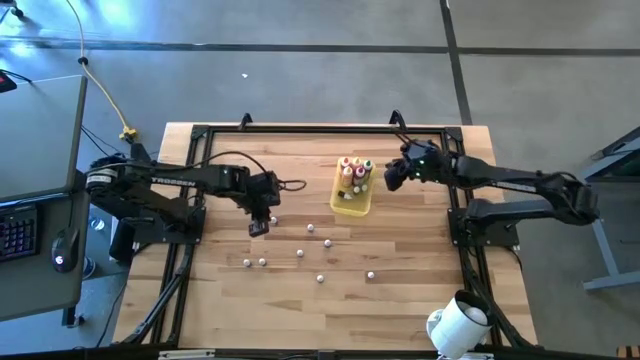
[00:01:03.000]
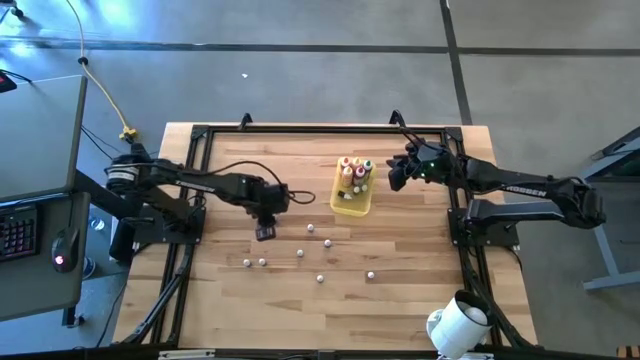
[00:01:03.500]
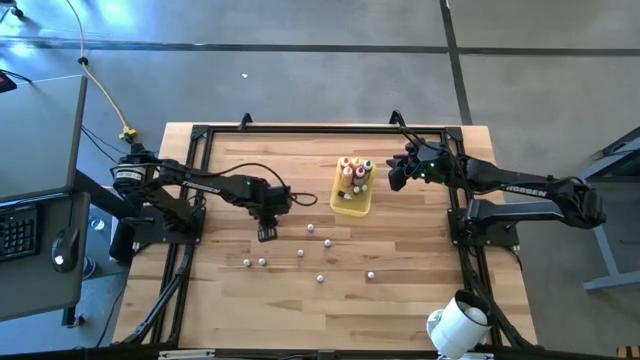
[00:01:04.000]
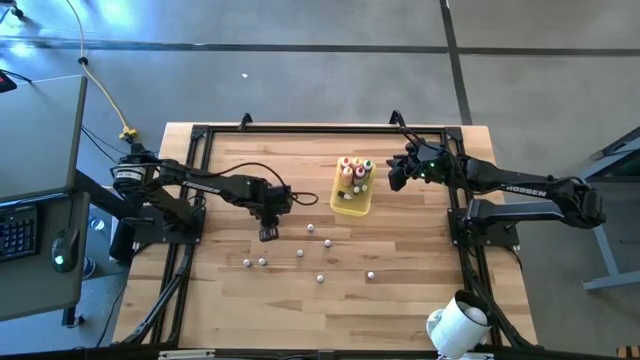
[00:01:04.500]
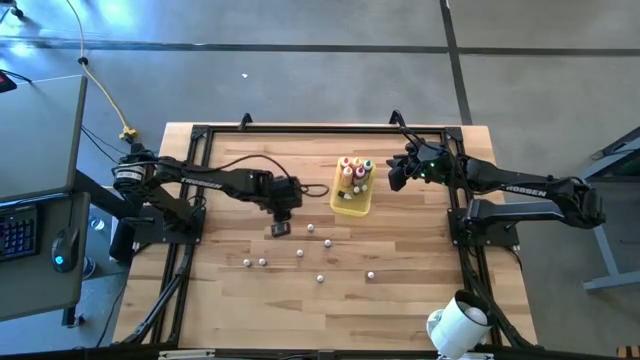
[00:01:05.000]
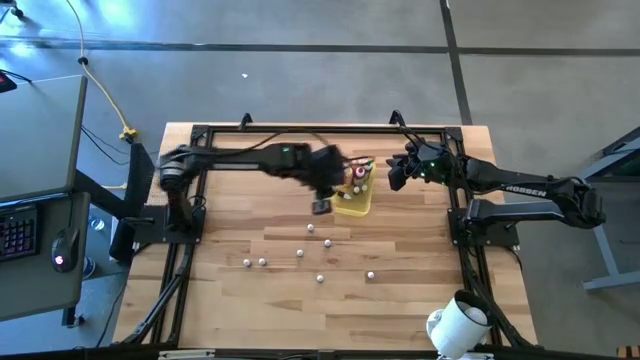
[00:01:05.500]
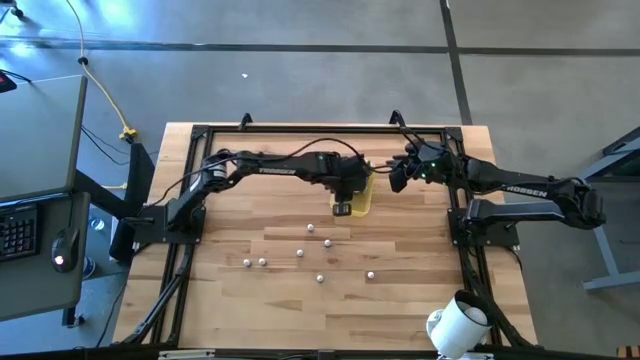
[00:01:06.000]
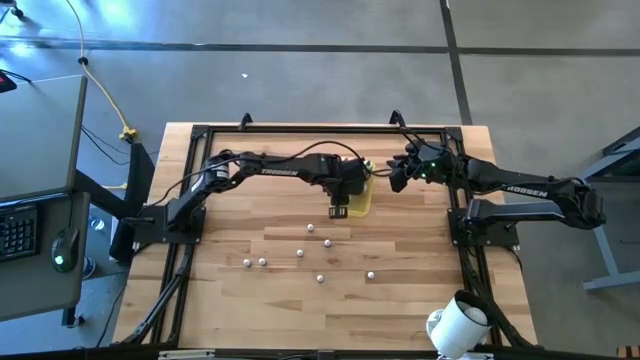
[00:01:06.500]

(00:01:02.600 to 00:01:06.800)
Task: Pick & Place food coloring
Put the small red food coloring bottle into the bin

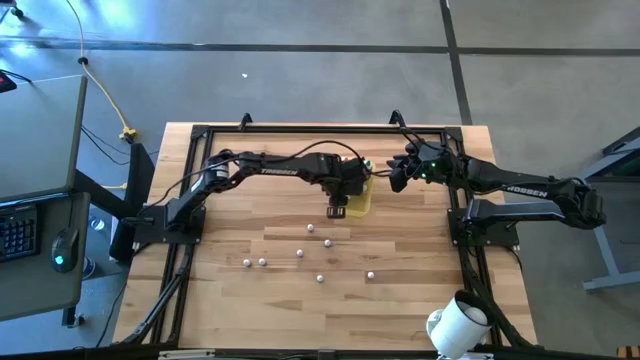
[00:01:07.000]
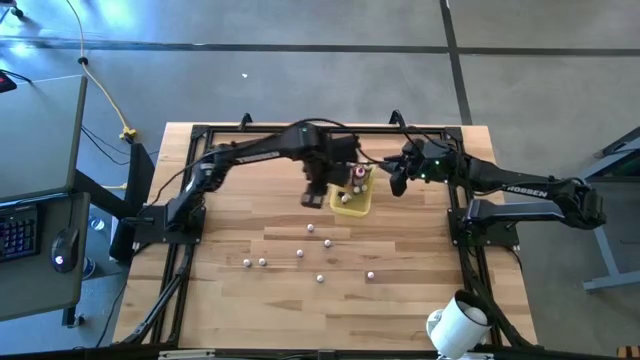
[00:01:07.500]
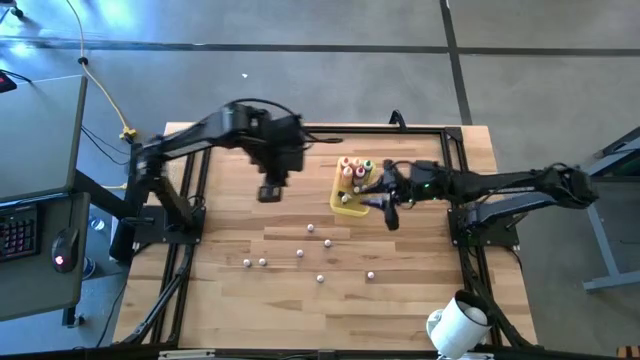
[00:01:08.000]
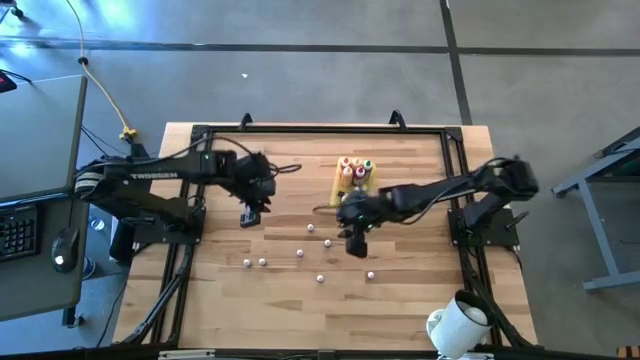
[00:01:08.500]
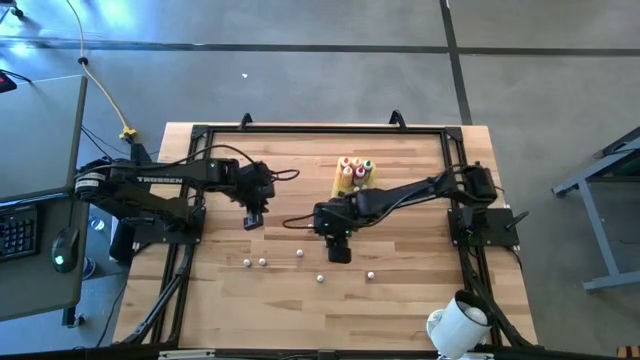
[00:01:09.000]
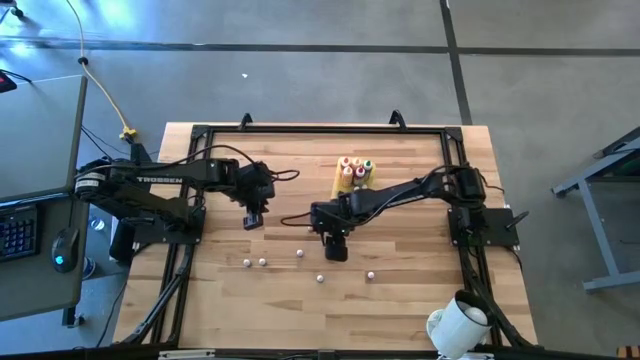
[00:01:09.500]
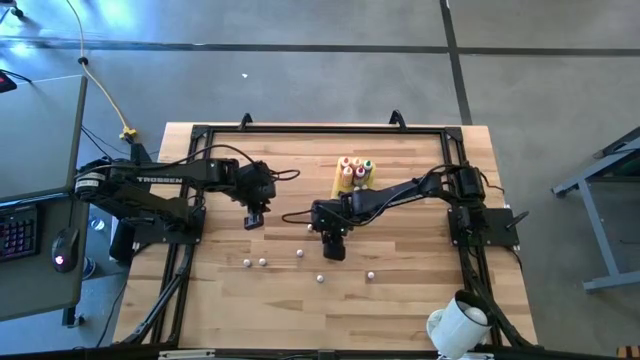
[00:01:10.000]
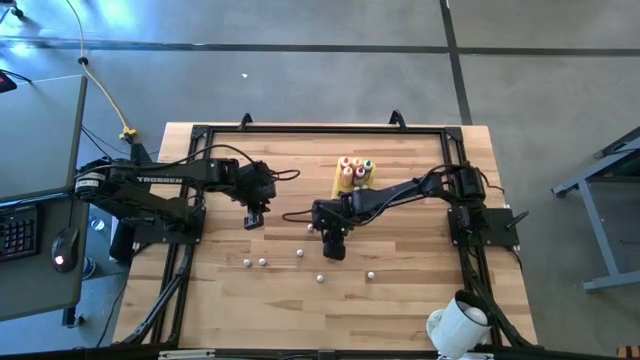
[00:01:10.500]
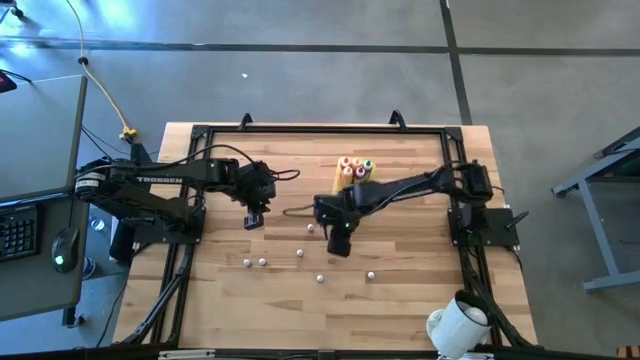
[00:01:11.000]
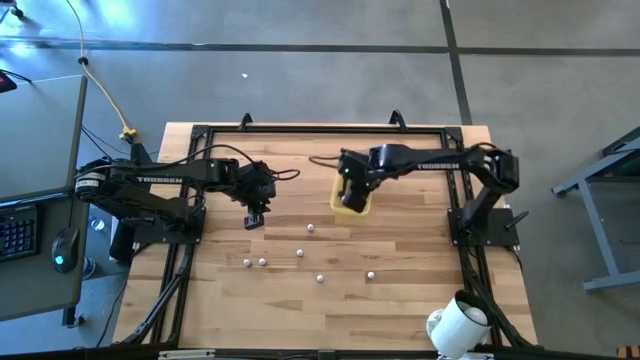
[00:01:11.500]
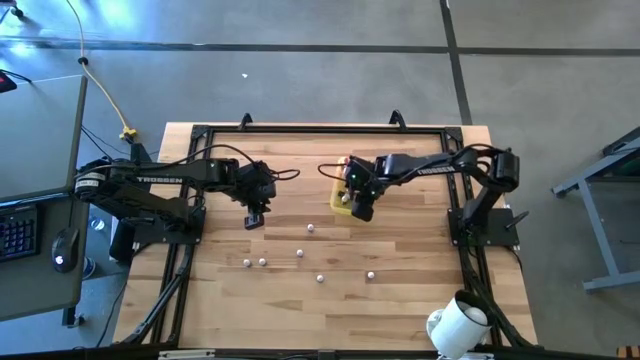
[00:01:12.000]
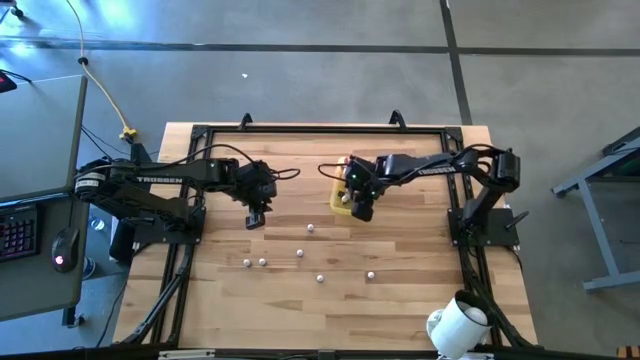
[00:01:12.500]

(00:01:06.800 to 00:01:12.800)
Put the small green food coloring bottle into the bin

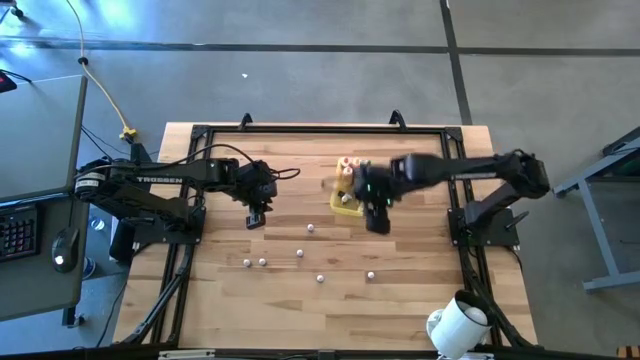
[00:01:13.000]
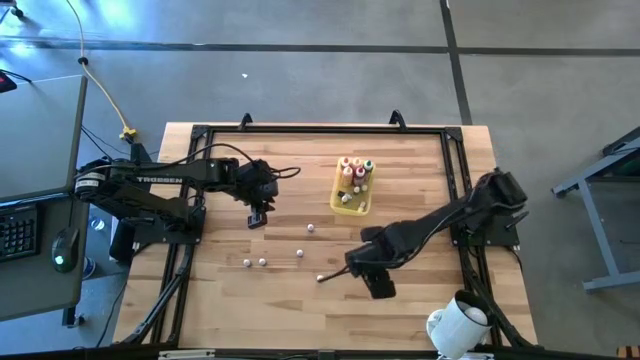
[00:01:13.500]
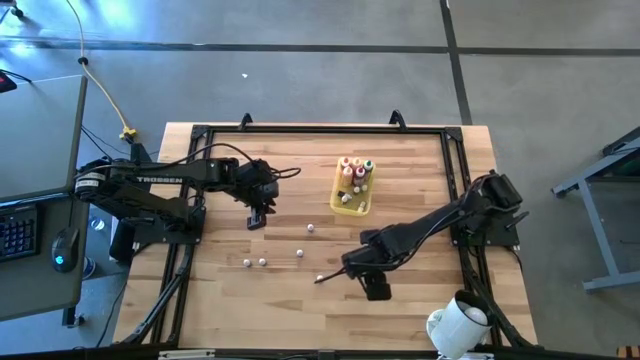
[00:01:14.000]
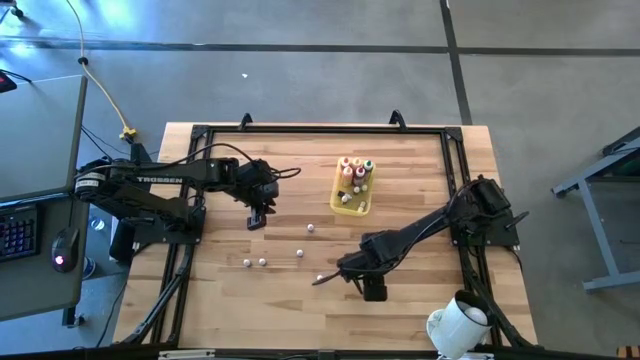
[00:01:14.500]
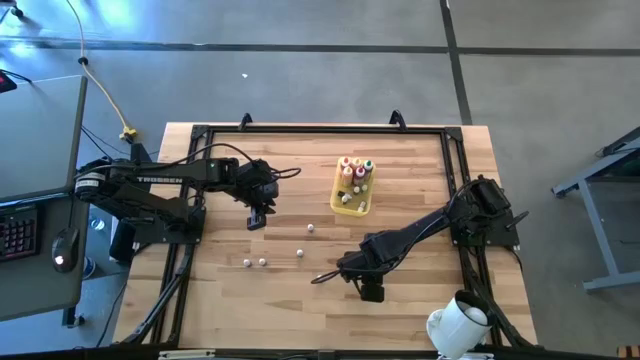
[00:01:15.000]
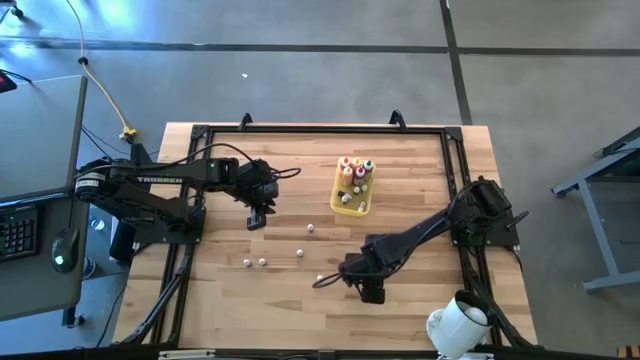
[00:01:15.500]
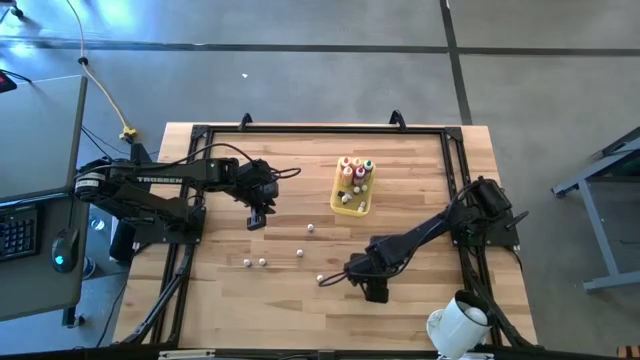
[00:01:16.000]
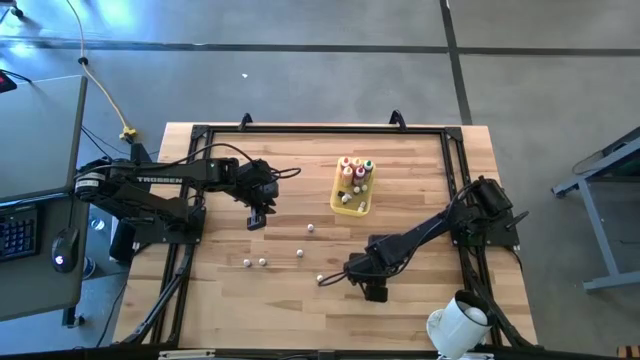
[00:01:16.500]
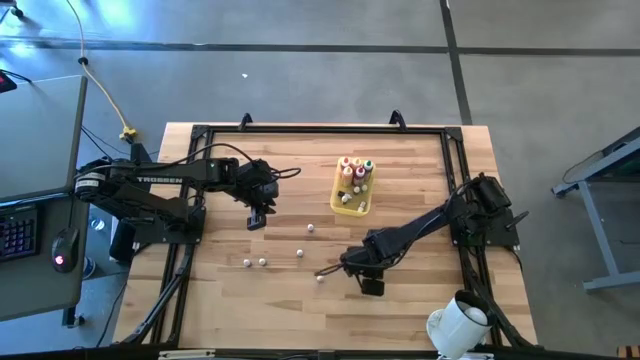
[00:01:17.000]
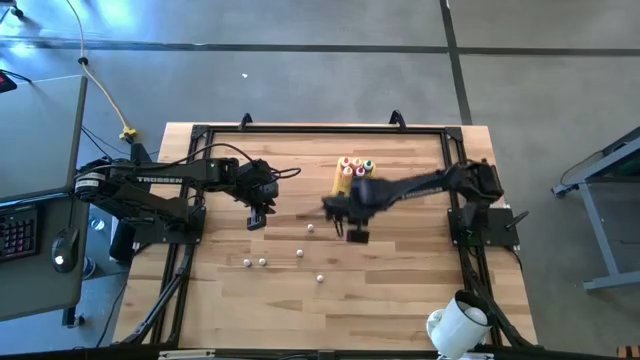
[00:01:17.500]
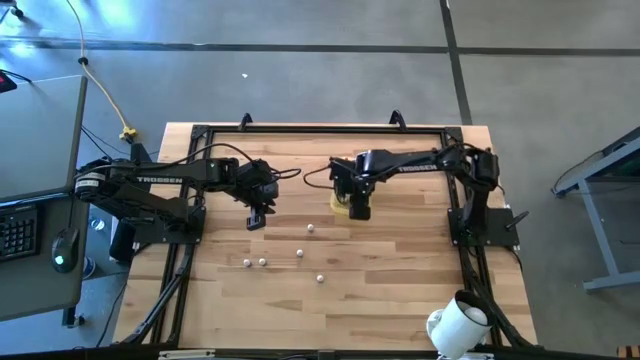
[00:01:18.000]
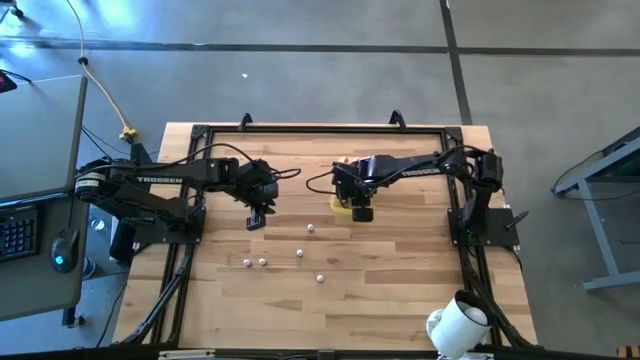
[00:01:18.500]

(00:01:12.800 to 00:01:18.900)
Put the small orange food coloring bottle into the bin

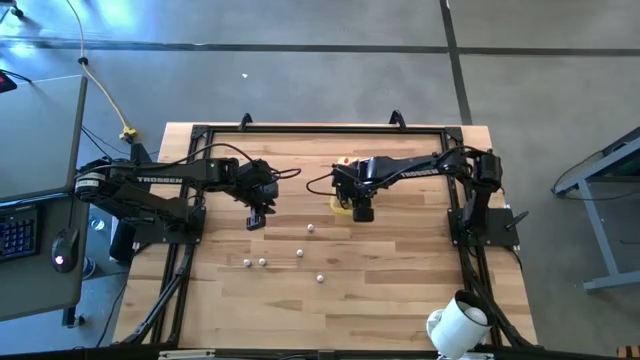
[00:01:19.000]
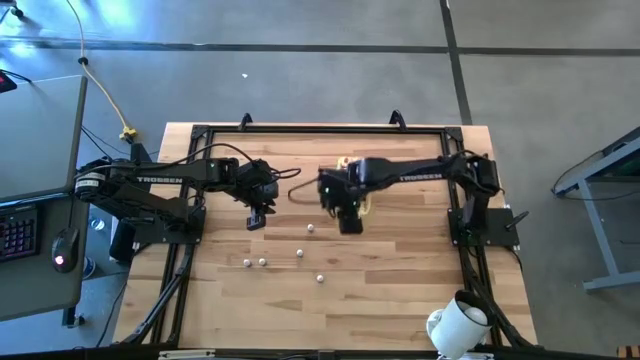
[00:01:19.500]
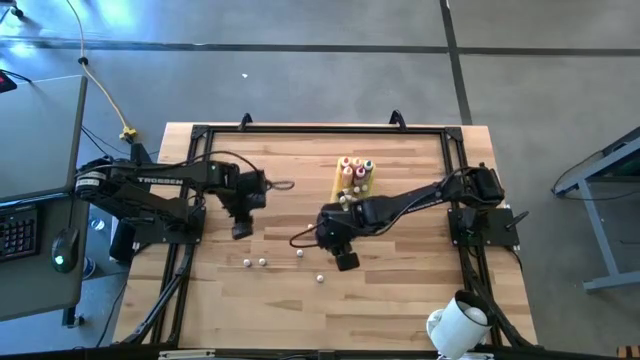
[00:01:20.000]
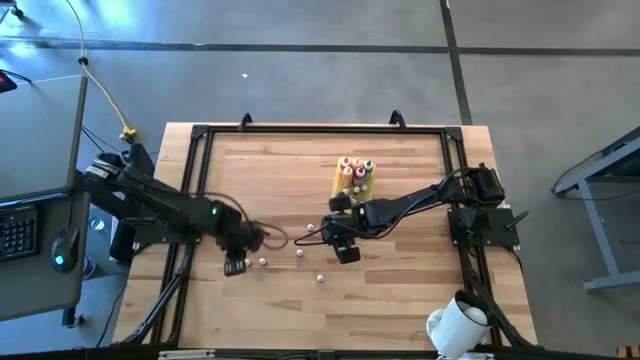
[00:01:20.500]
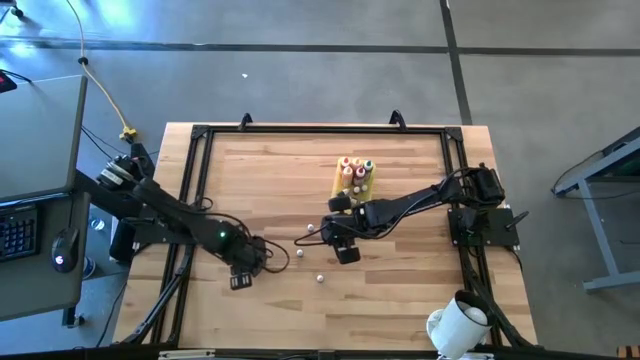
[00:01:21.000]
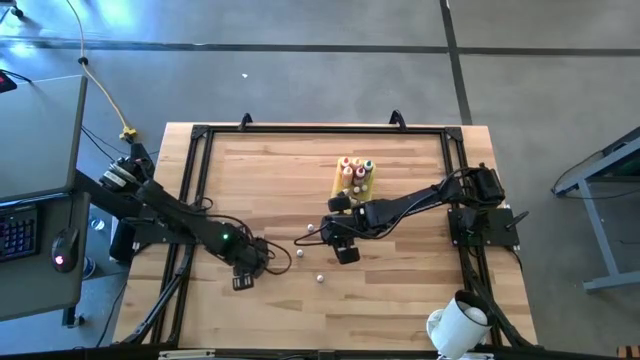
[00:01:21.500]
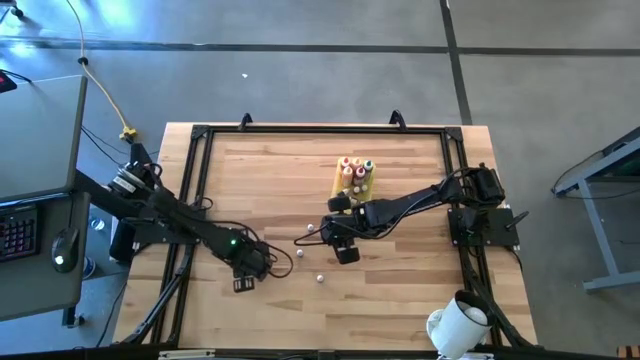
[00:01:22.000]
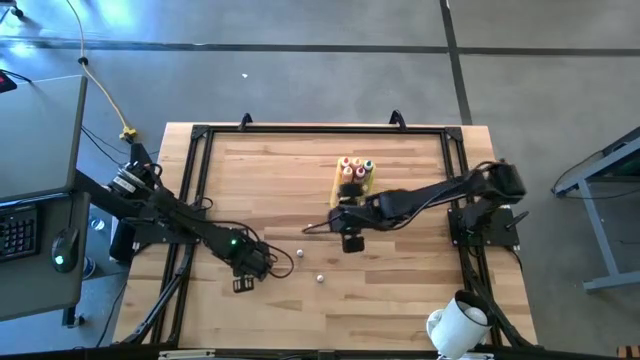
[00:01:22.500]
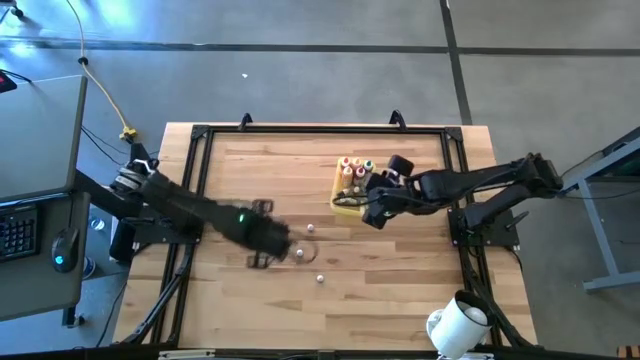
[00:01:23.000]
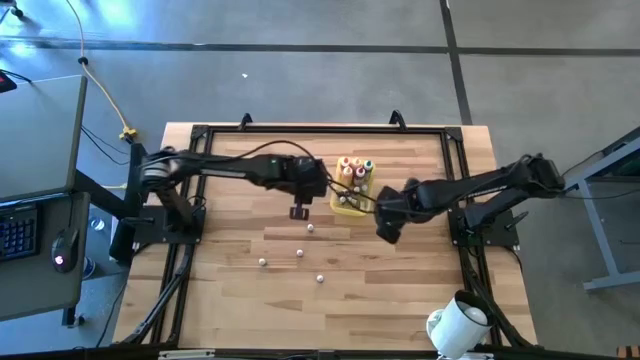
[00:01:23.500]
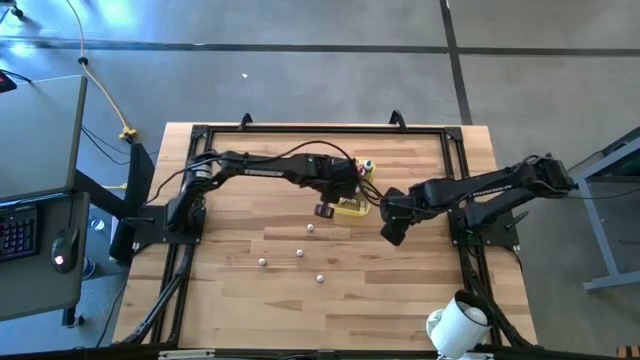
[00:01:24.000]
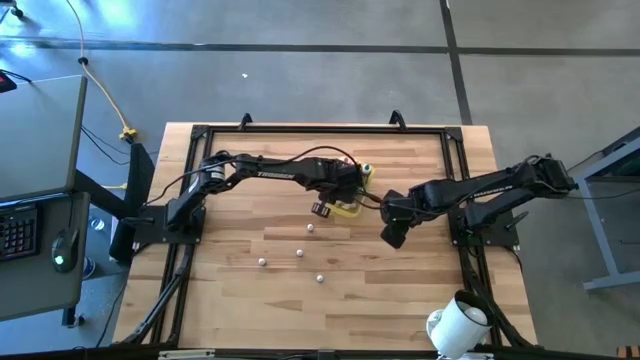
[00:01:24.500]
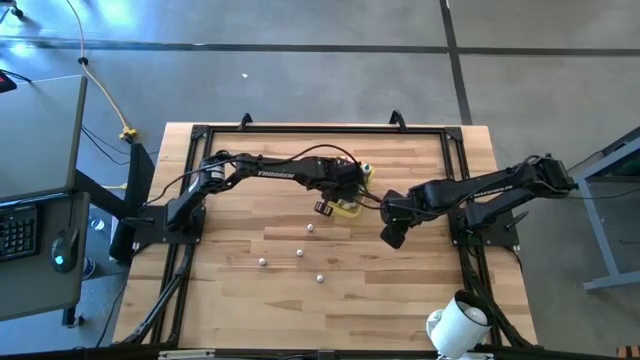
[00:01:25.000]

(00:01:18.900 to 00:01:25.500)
Put the small purple food coloring bottle into the bin
